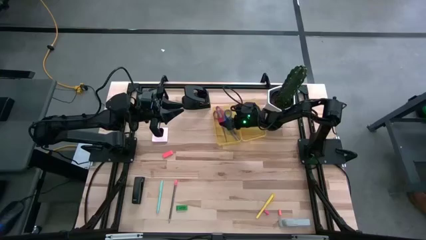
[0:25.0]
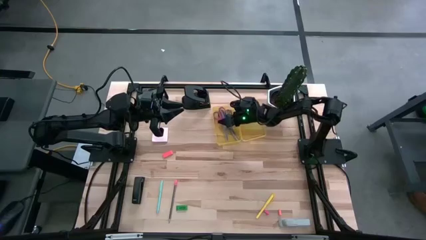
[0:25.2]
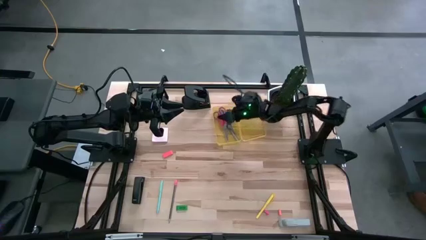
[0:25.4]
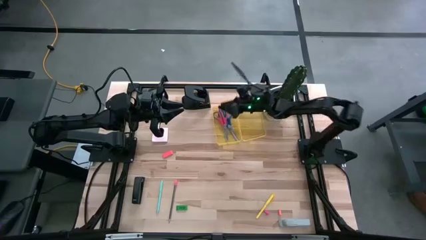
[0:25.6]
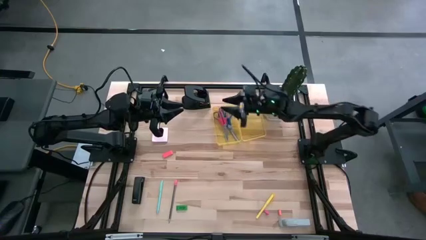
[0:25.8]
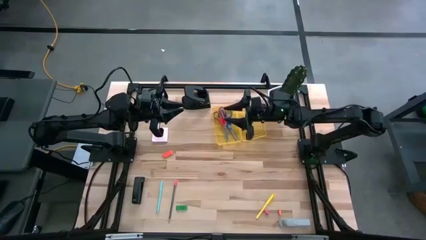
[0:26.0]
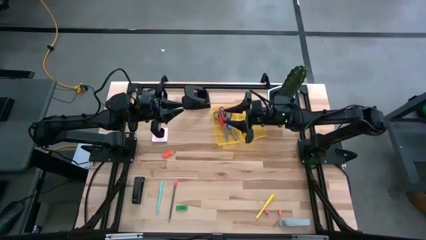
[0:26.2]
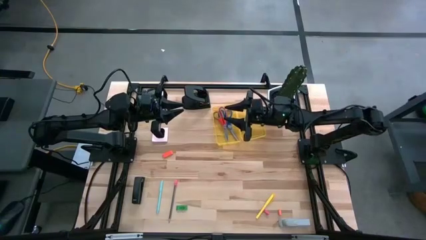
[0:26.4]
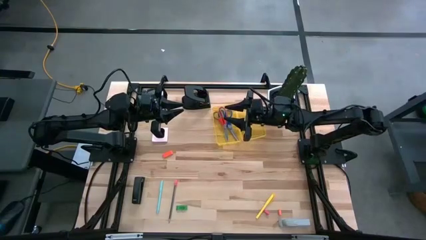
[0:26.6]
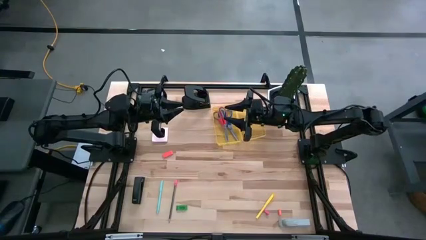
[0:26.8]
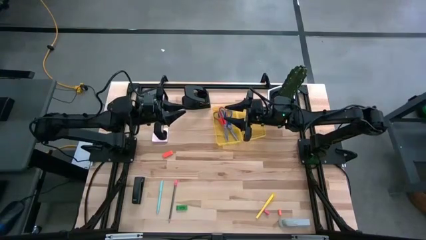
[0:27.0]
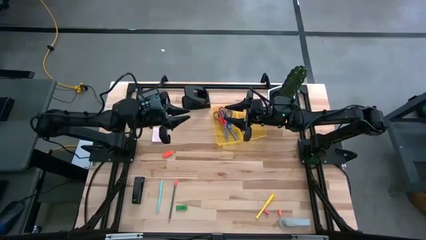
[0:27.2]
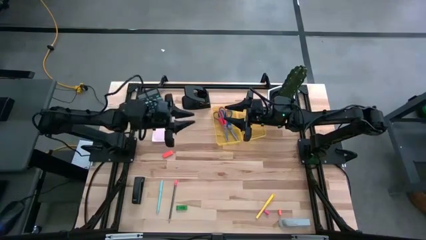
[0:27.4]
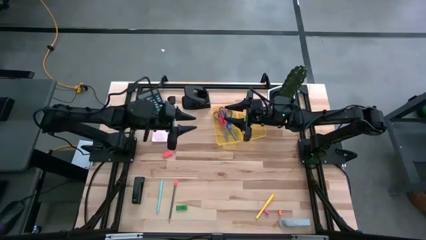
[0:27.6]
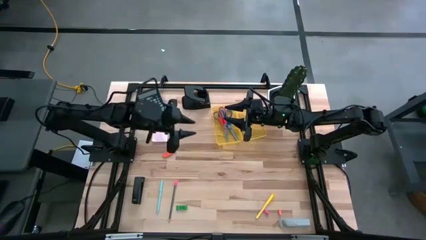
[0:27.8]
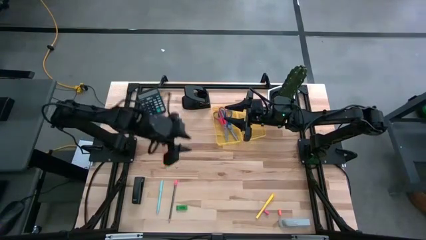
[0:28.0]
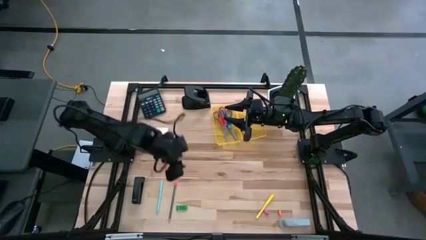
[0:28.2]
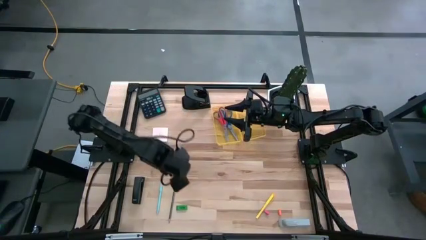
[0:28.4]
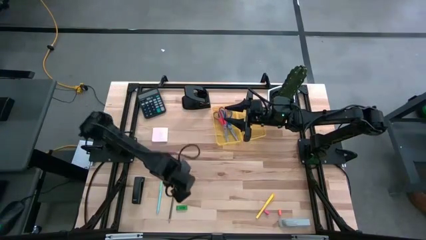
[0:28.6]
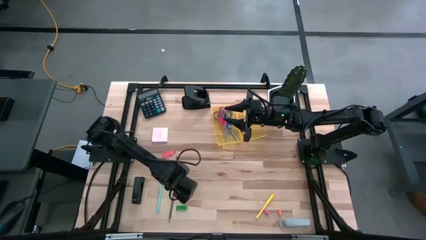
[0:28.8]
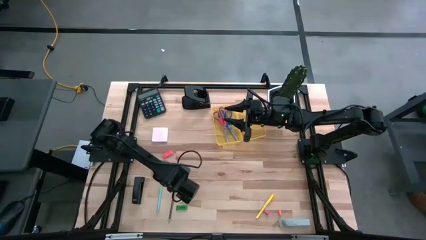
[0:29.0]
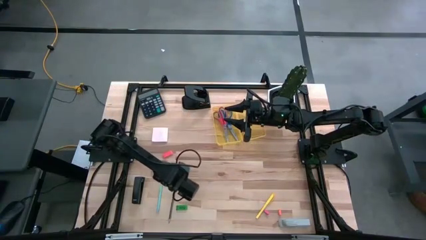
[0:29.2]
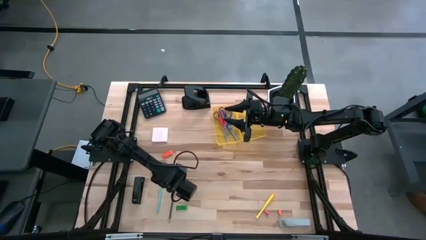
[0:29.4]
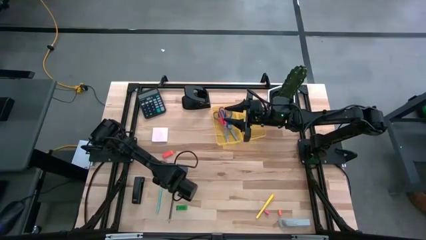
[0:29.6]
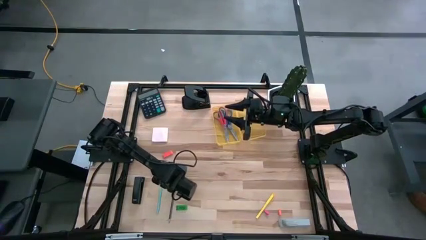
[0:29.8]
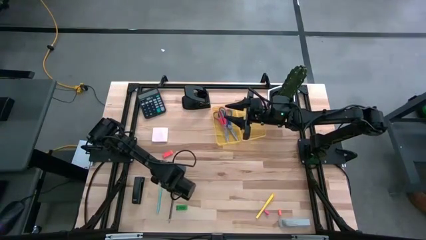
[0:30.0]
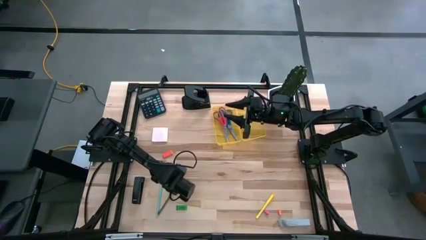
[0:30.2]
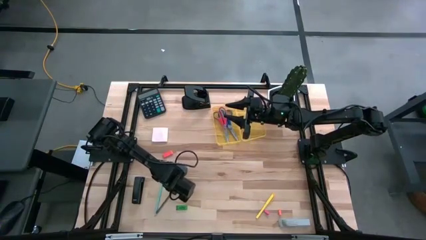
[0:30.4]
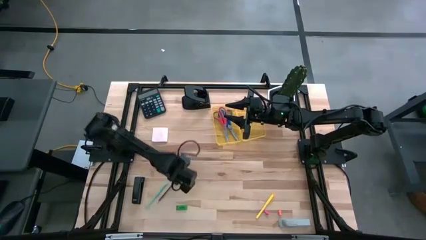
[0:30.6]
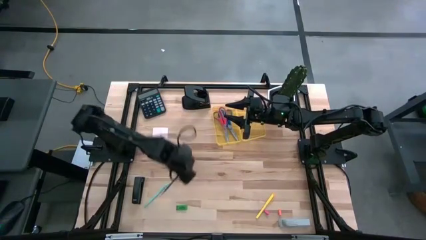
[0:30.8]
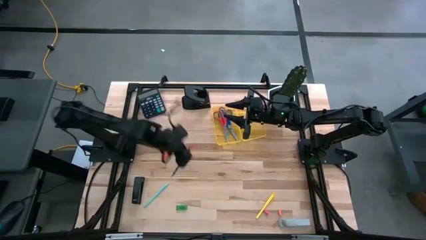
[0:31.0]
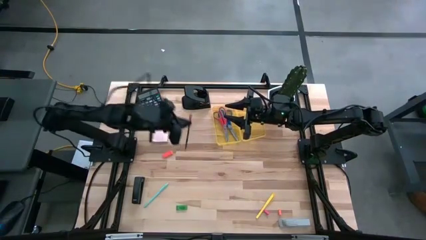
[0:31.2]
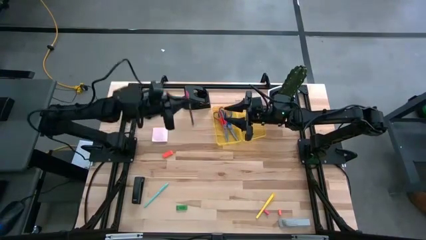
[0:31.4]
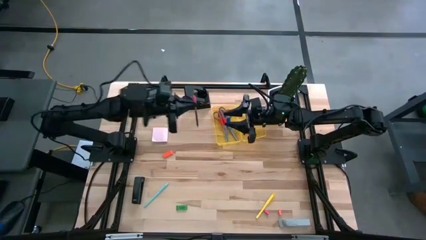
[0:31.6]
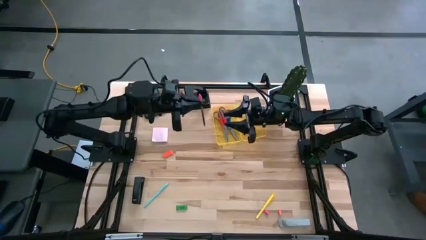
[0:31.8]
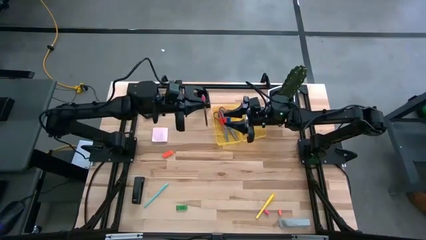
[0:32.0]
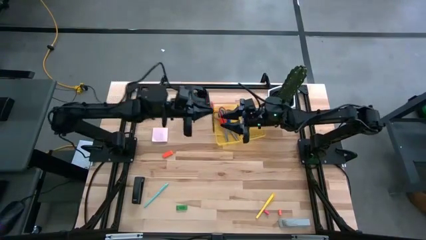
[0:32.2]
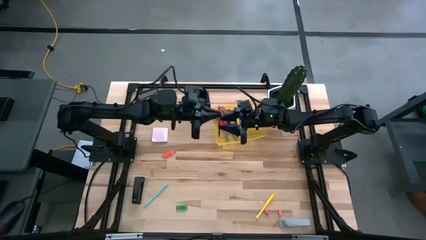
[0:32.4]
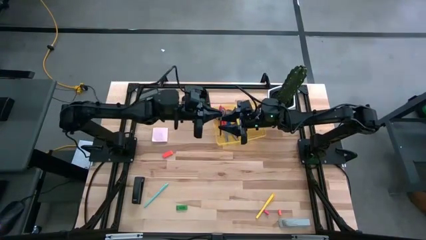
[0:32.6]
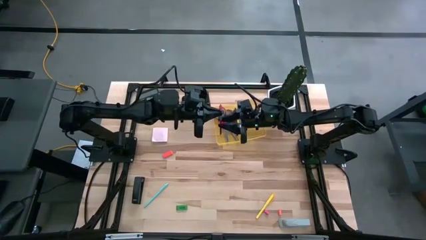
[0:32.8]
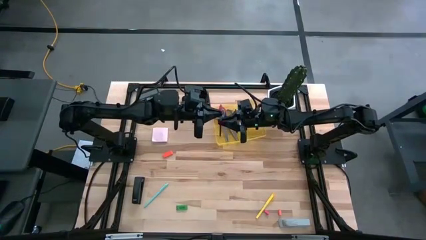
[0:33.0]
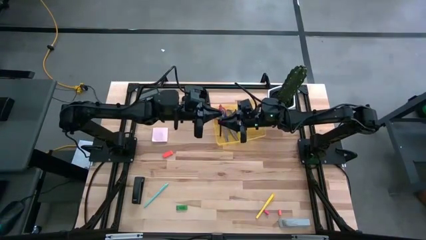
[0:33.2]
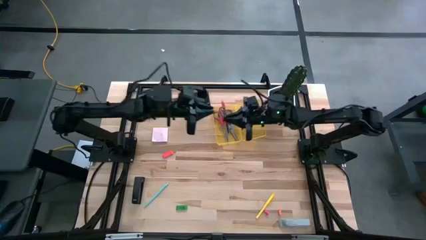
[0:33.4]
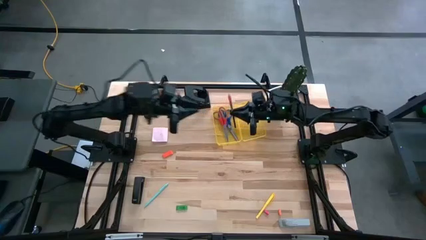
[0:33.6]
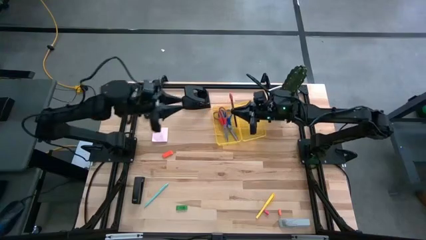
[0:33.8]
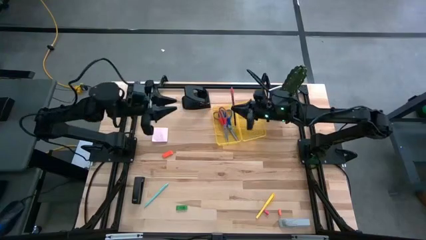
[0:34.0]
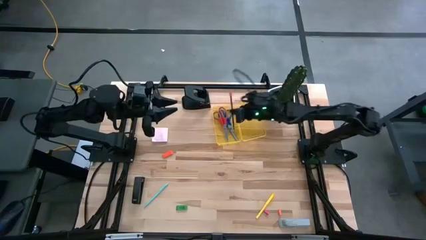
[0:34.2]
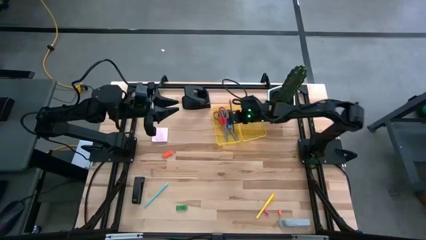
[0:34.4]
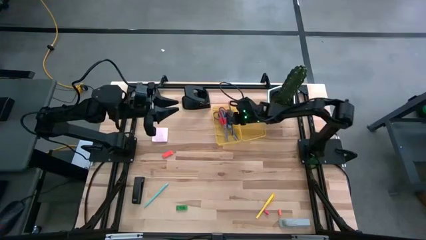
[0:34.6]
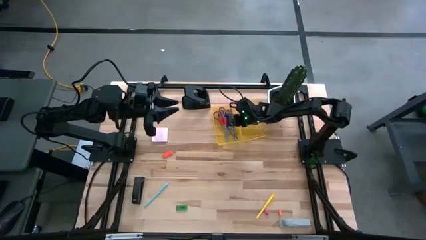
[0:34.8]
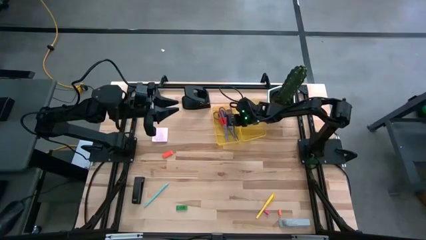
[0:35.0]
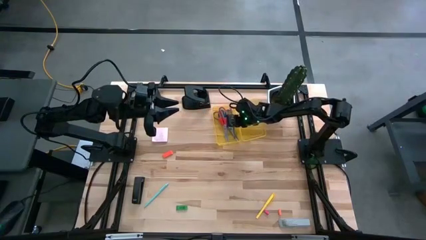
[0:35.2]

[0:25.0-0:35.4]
Task: Pack school essentials
Put the black pencil into the yellow supply box

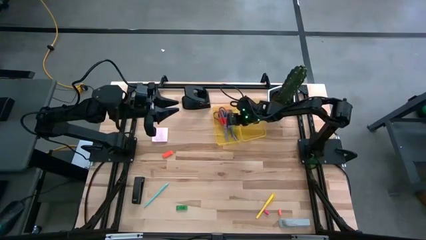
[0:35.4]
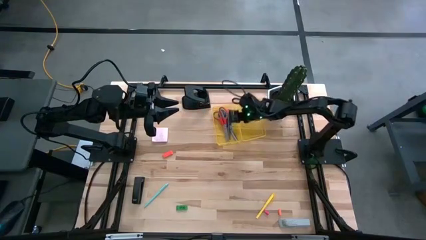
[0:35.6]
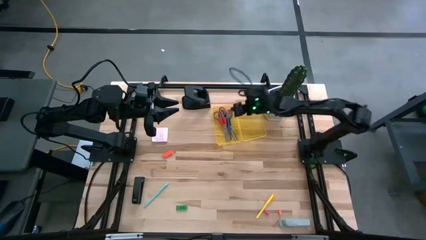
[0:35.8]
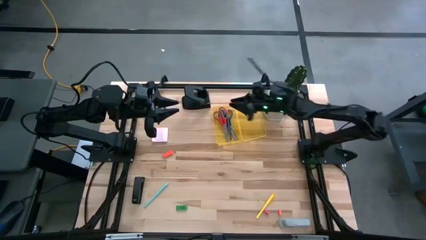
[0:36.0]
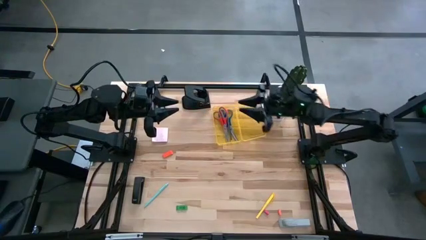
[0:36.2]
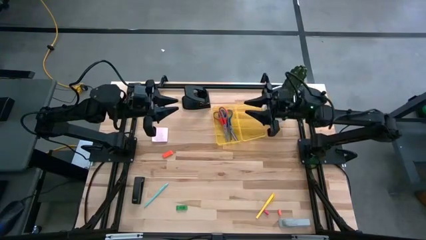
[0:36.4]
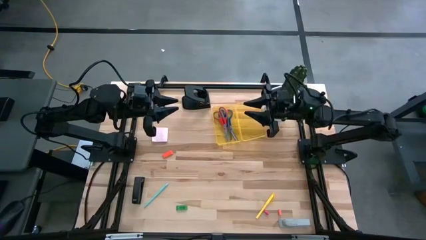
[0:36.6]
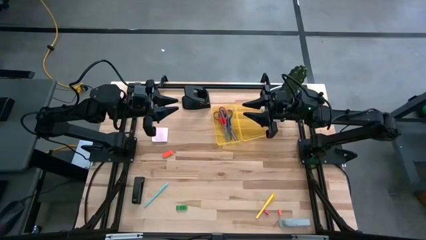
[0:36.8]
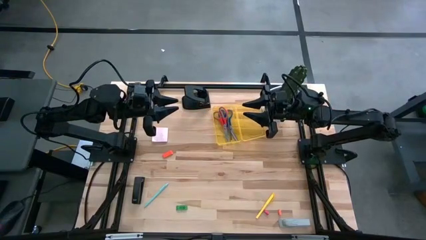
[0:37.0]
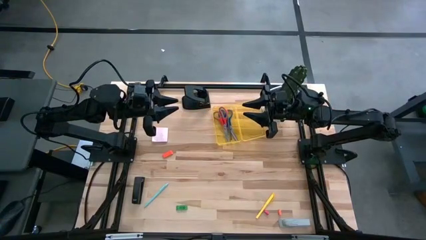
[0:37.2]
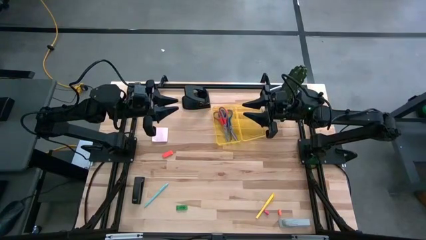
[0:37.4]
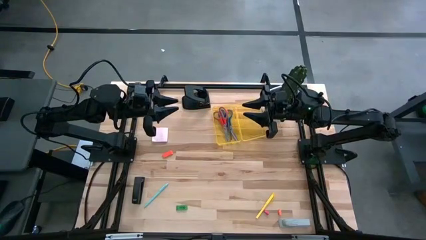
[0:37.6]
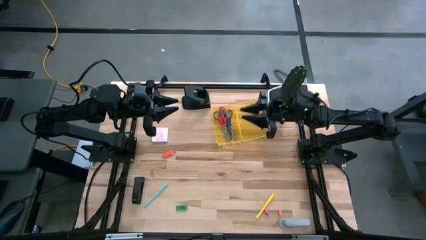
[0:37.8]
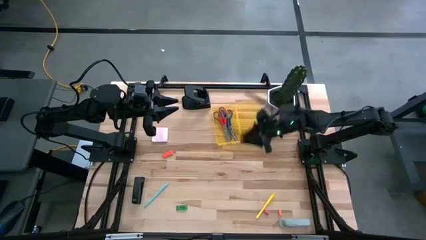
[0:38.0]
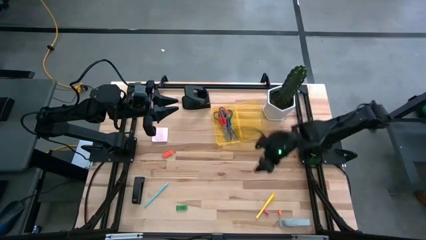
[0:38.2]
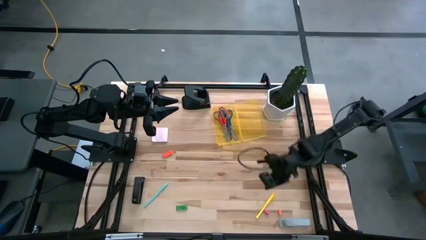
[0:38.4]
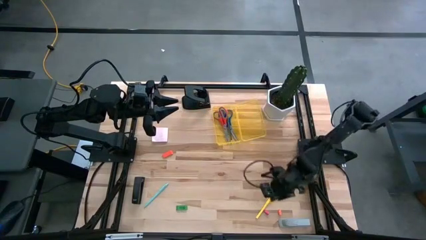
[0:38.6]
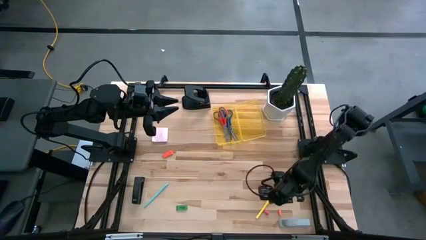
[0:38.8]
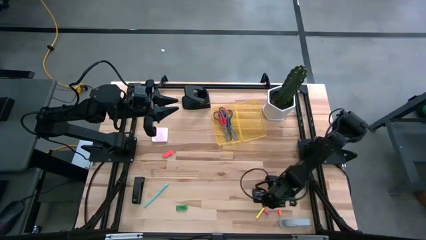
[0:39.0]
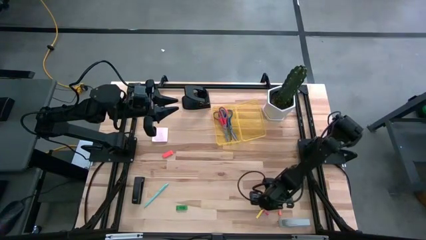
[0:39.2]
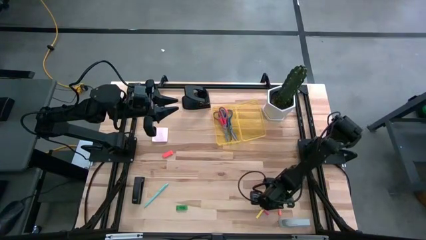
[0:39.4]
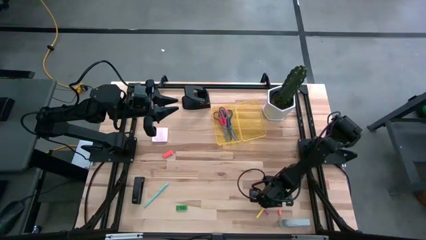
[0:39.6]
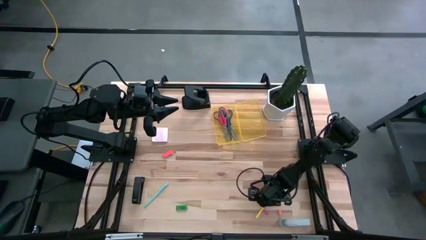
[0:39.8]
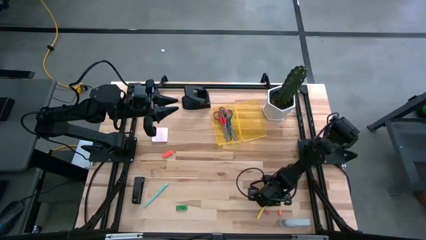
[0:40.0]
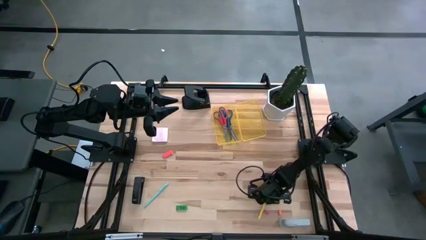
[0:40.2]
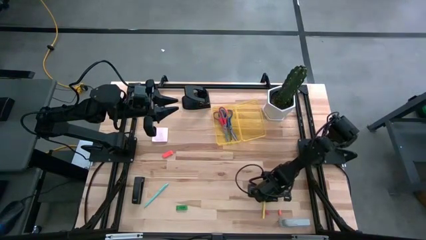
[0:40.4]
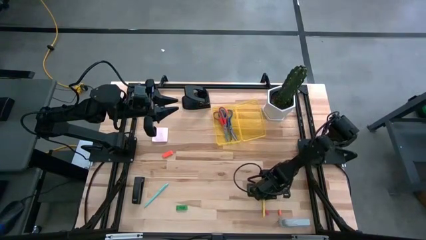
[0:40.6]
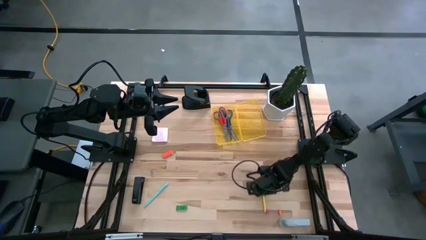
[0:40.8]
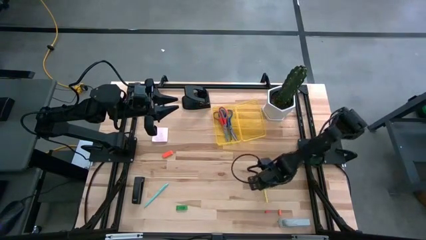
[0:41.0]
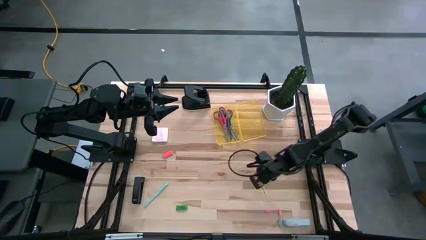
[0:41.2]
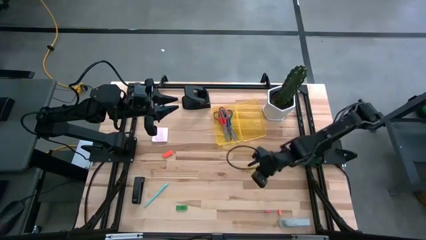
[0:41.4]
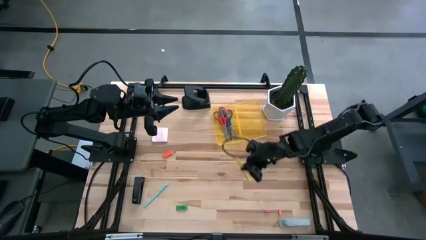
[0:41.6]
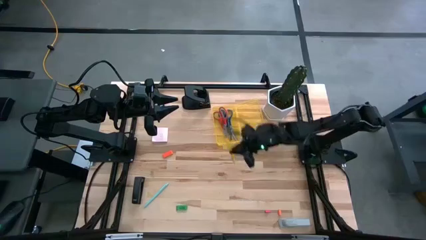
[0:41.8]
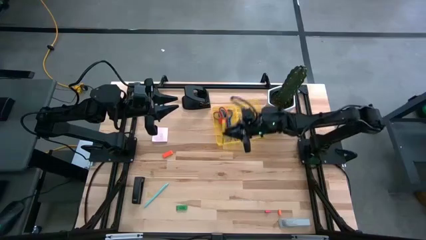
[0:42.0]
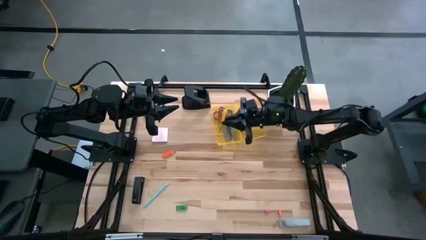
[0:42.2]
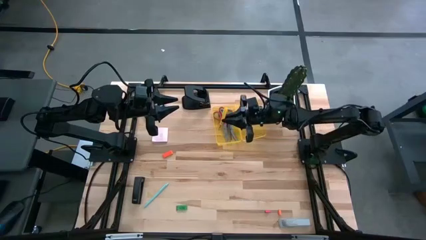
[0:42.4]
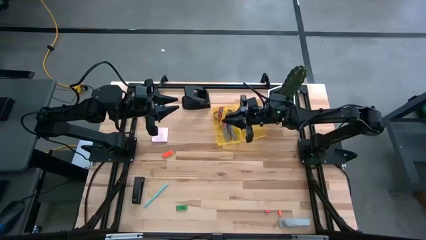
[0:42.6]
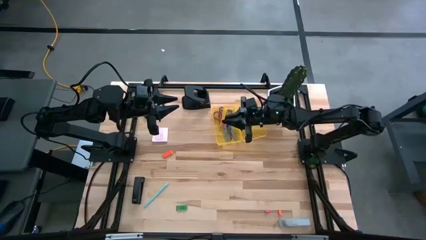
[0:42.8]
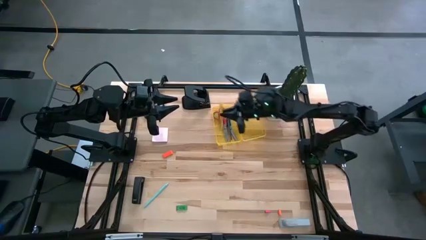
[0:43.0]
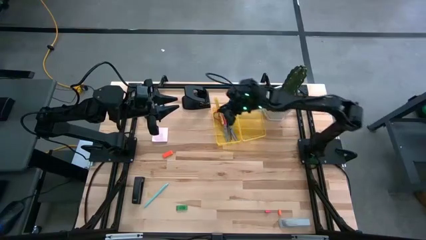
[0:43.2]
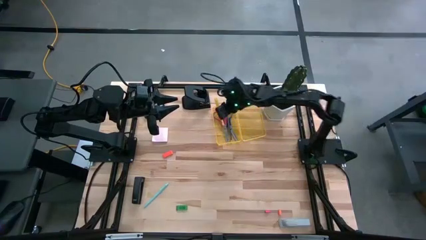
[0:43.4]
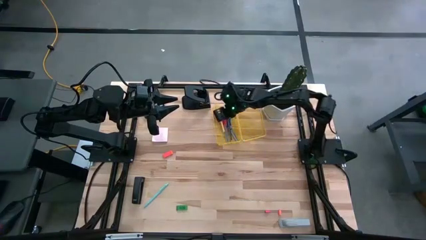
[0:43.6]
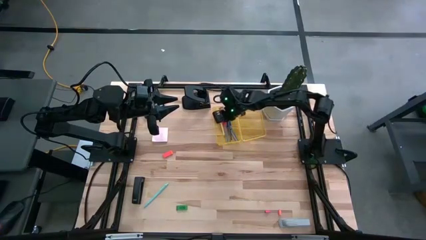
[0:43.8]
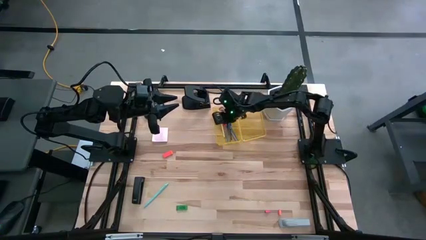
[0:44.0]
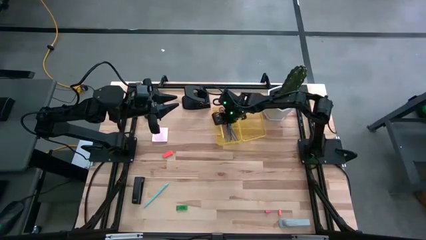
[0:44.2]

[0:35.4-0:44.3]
Put the yellow ballpen into the yellow supply box
